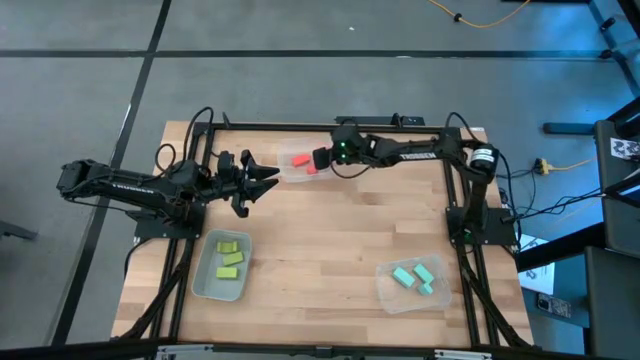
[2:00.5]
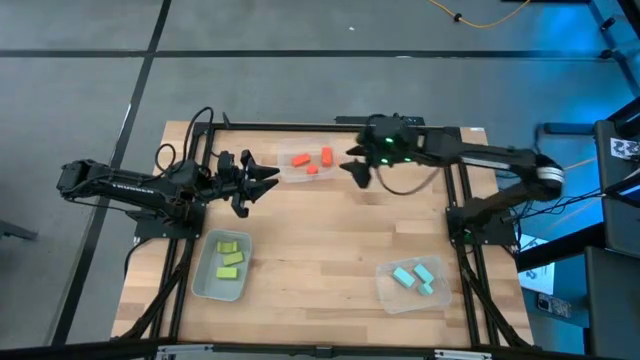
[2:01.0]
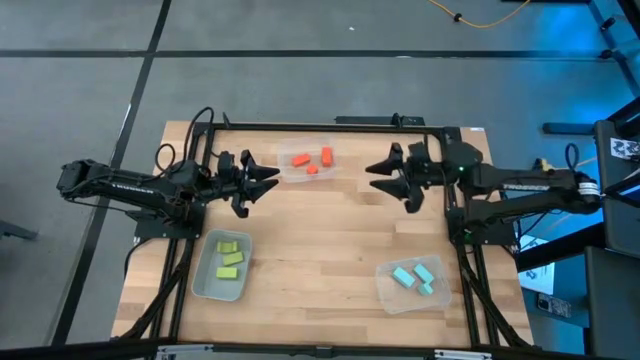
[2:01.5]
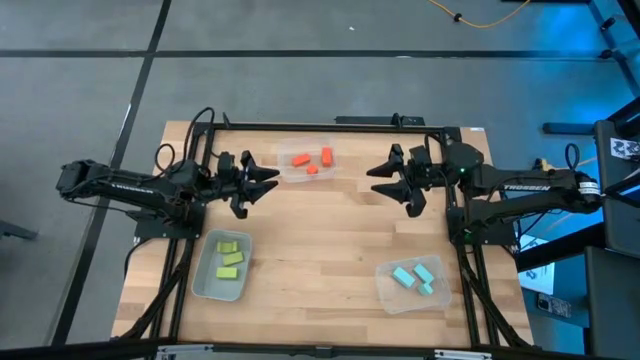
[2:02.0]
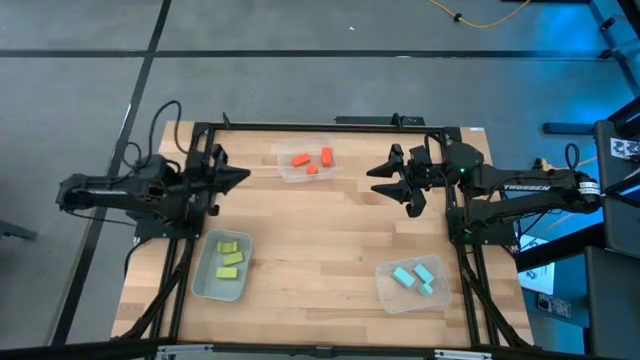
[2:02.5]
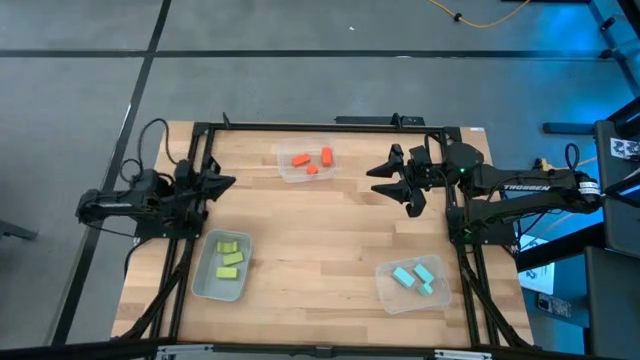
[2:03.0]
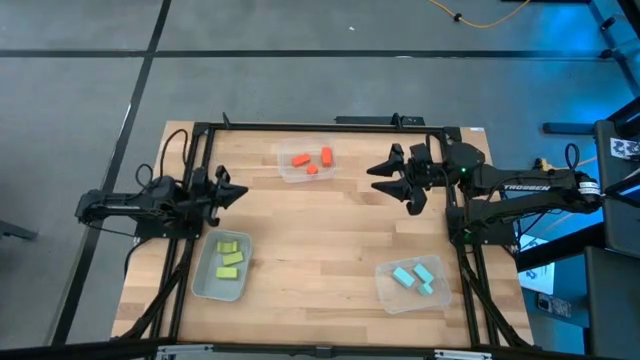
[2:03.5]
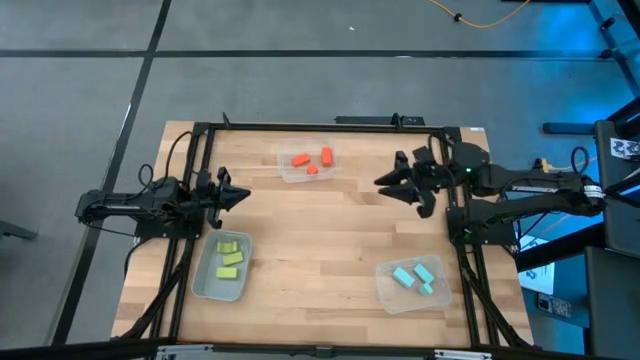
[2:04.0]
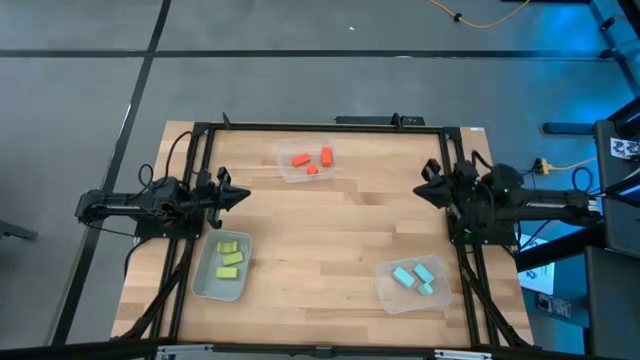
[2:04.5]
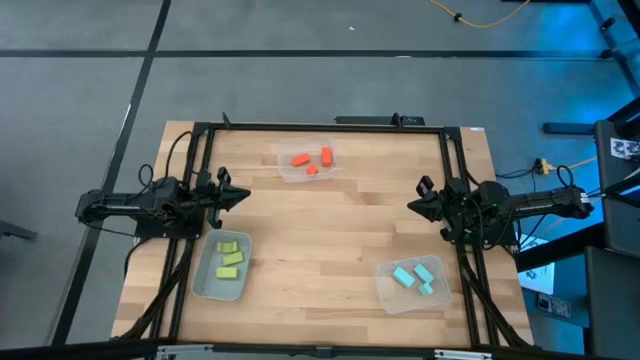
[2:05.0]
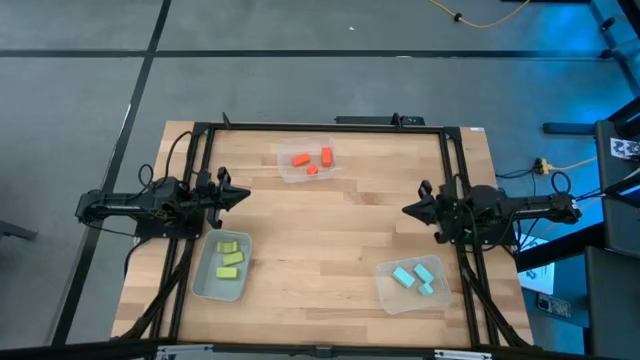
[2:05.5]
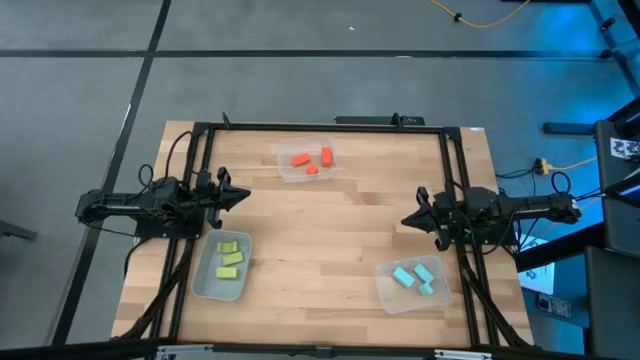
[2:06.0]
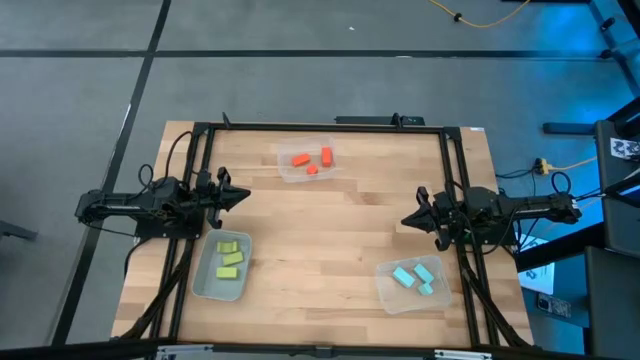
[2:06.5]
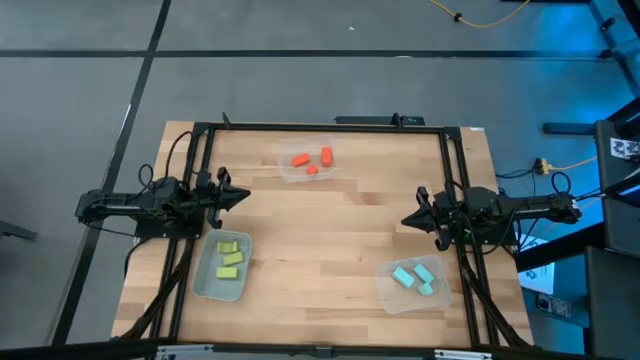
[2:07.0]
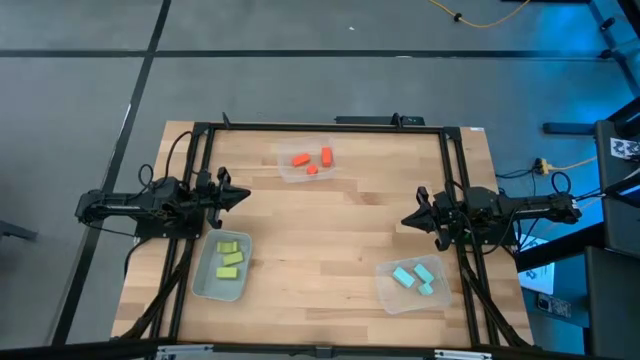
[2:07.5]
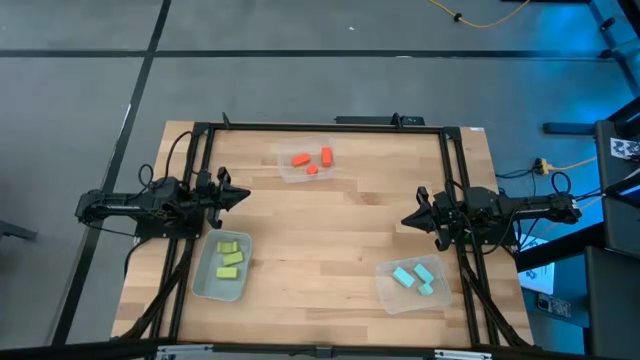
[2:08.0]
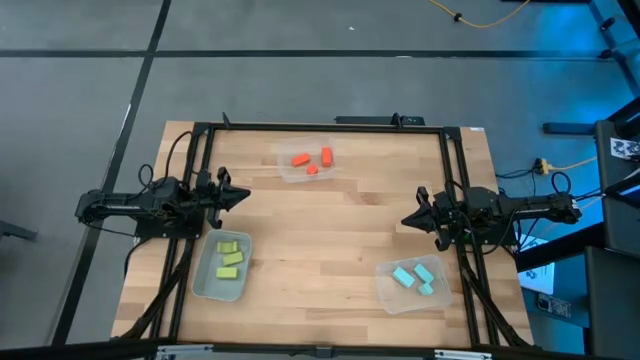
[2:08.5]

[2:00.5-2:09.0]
Task: Sort & place blocks by color
Return to Home Position

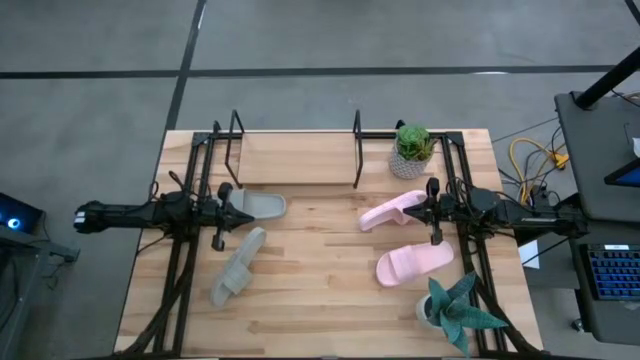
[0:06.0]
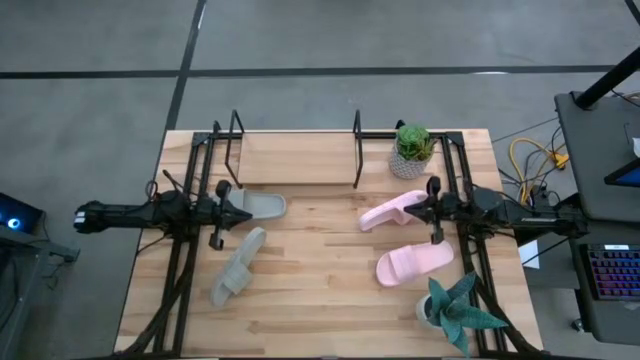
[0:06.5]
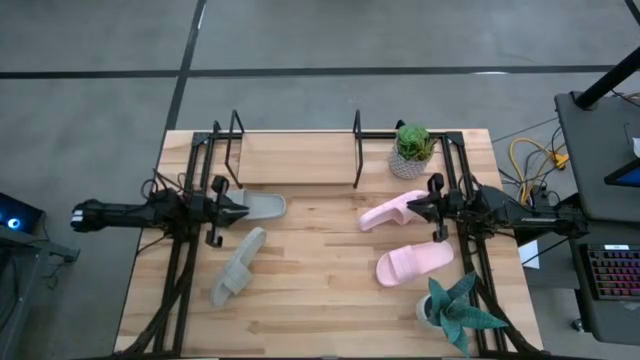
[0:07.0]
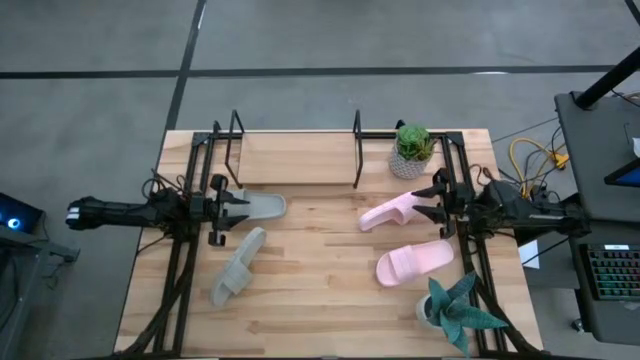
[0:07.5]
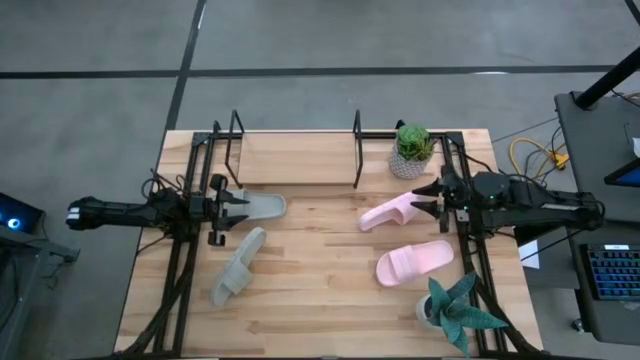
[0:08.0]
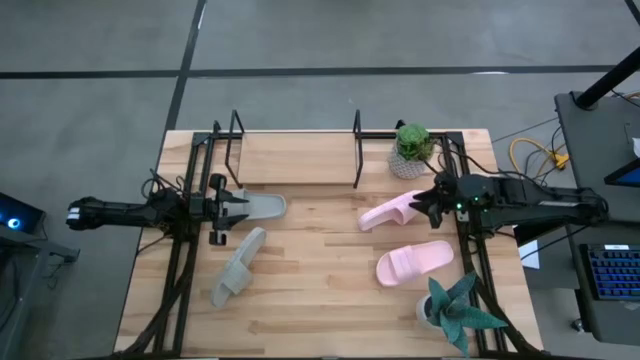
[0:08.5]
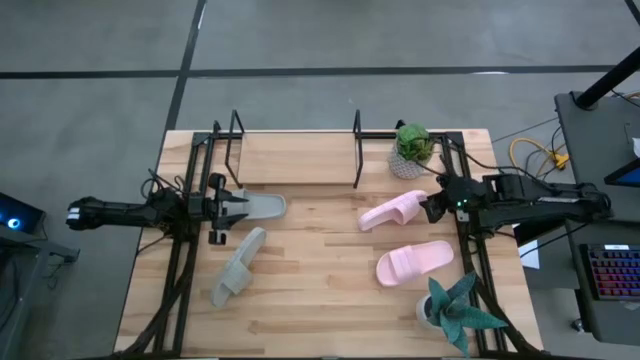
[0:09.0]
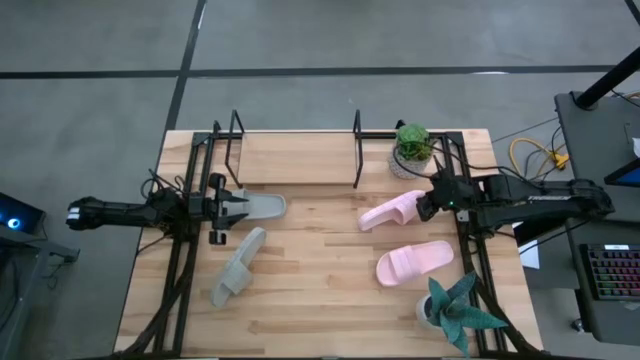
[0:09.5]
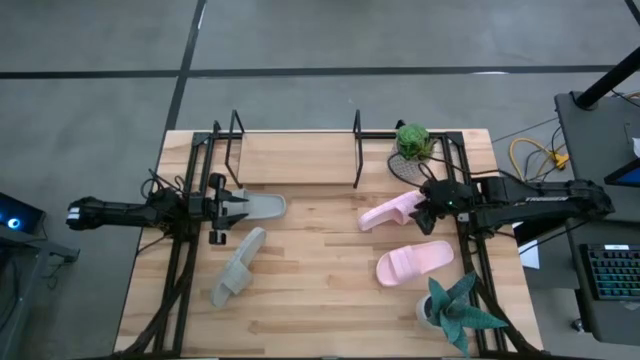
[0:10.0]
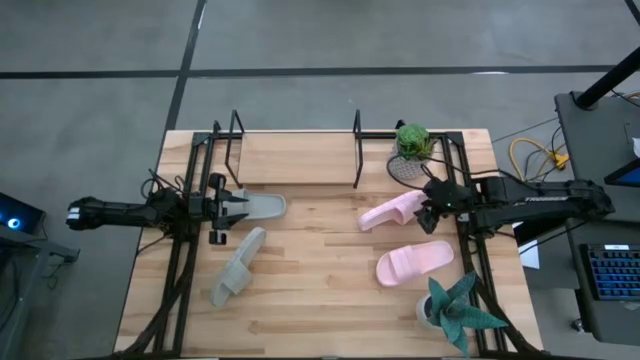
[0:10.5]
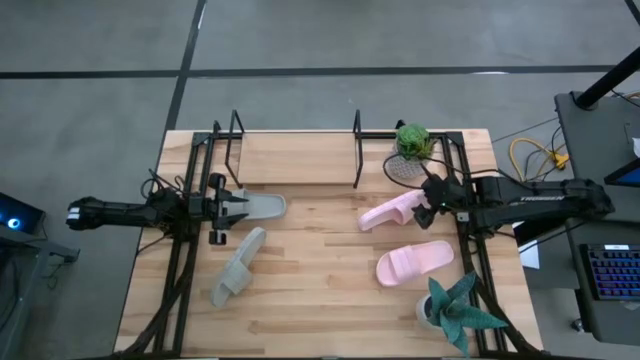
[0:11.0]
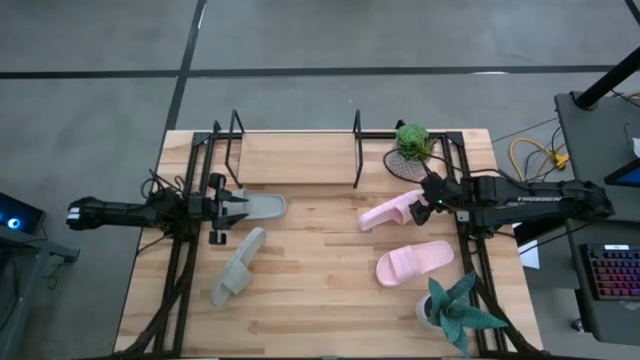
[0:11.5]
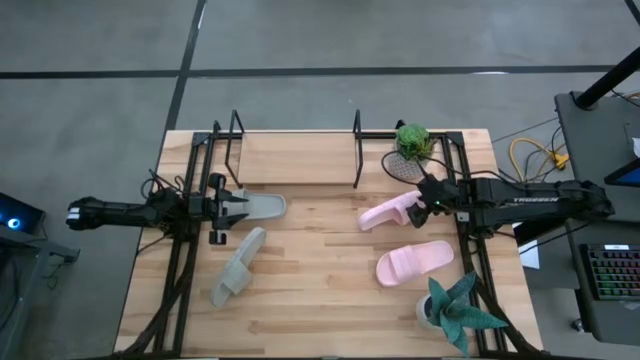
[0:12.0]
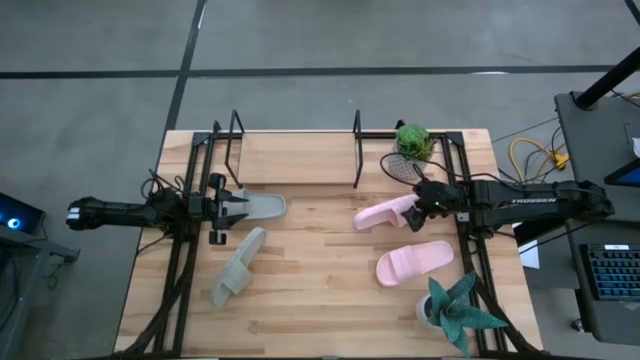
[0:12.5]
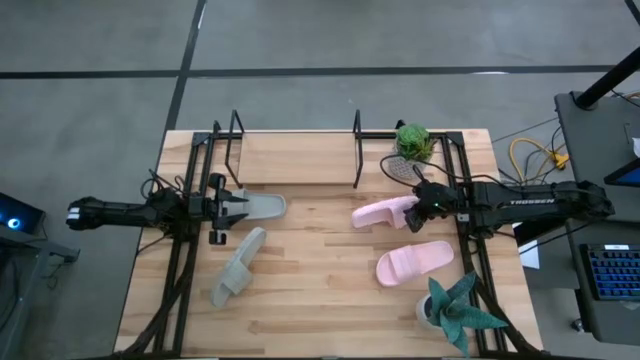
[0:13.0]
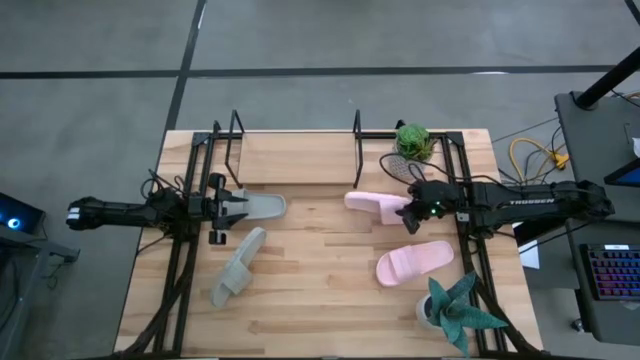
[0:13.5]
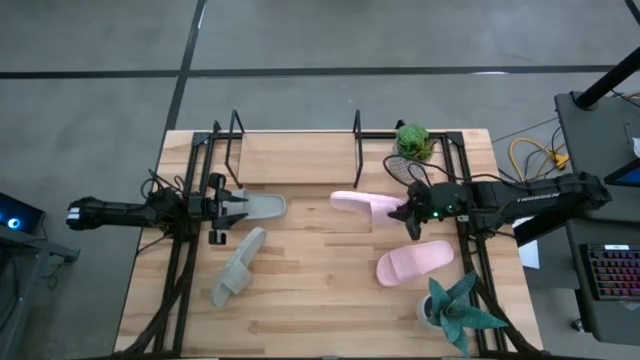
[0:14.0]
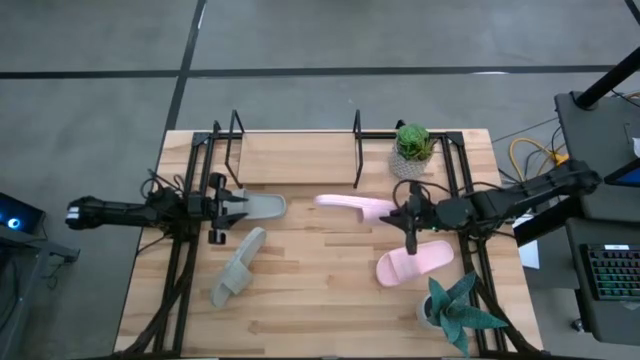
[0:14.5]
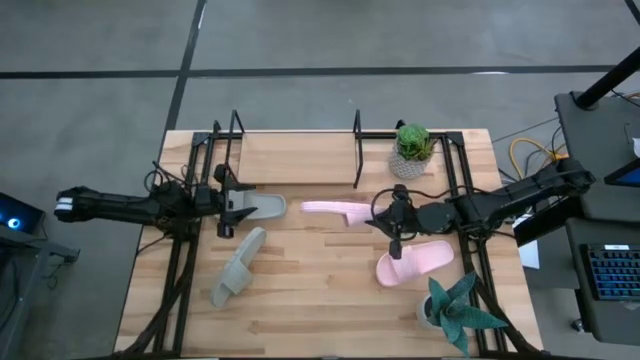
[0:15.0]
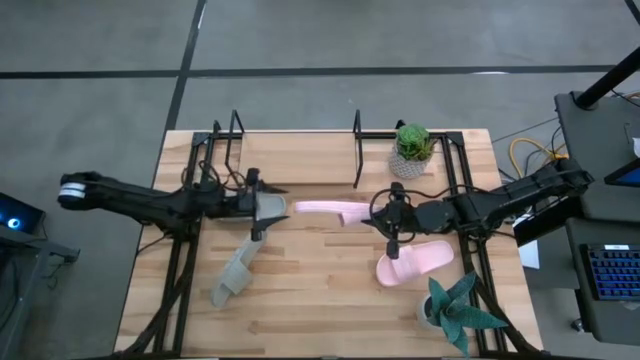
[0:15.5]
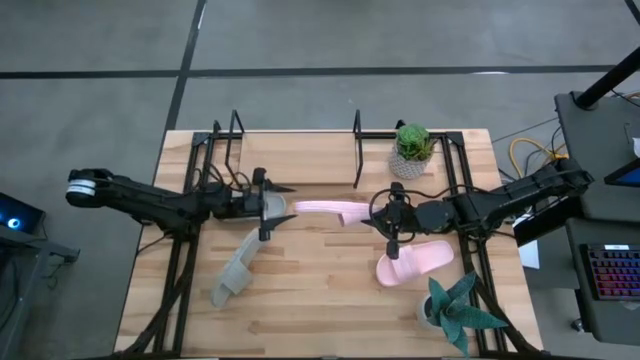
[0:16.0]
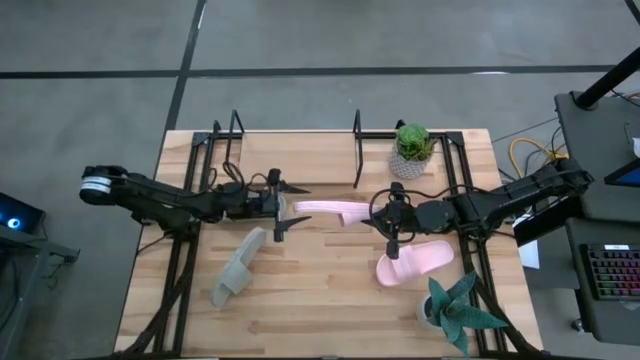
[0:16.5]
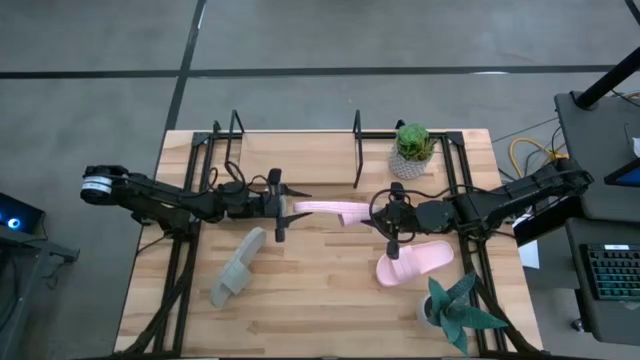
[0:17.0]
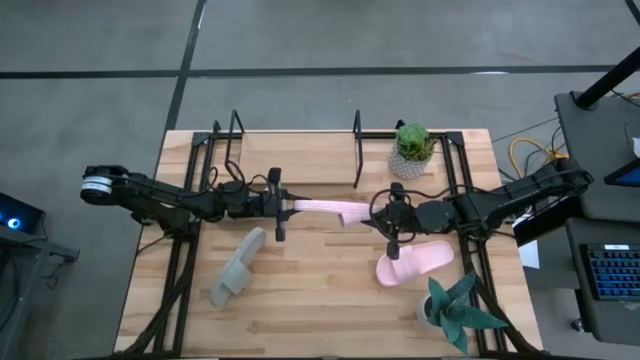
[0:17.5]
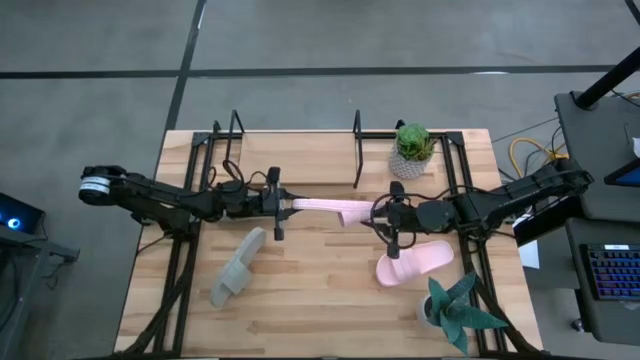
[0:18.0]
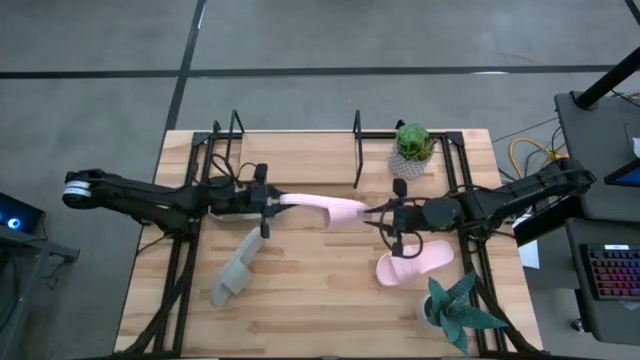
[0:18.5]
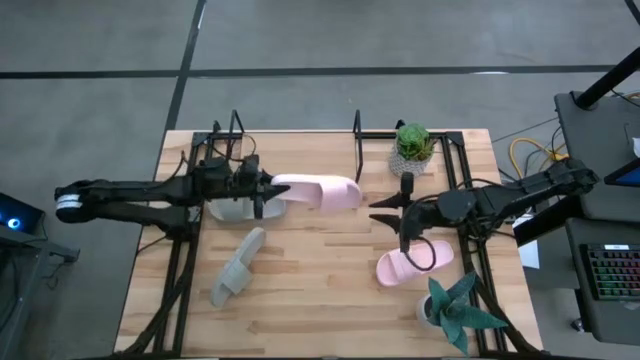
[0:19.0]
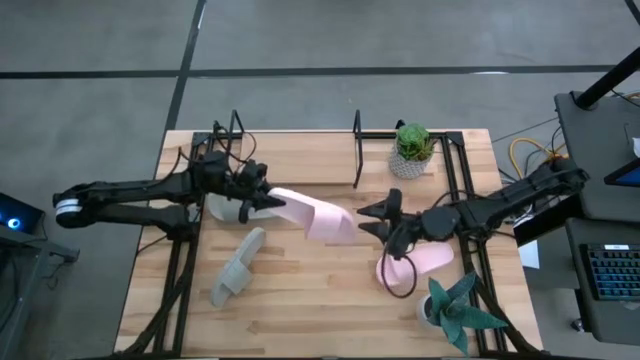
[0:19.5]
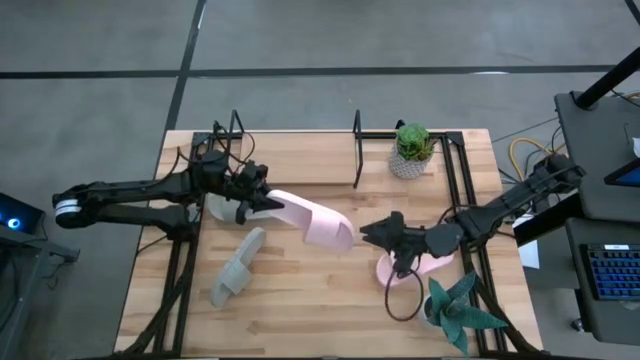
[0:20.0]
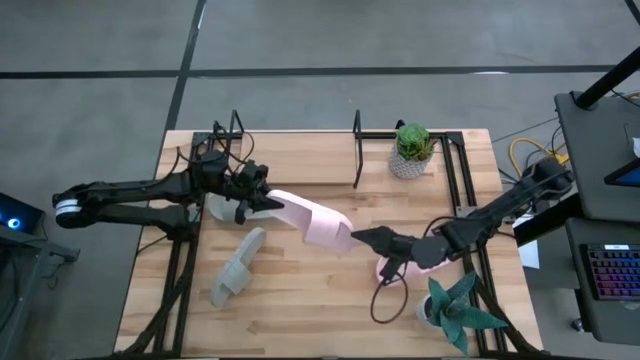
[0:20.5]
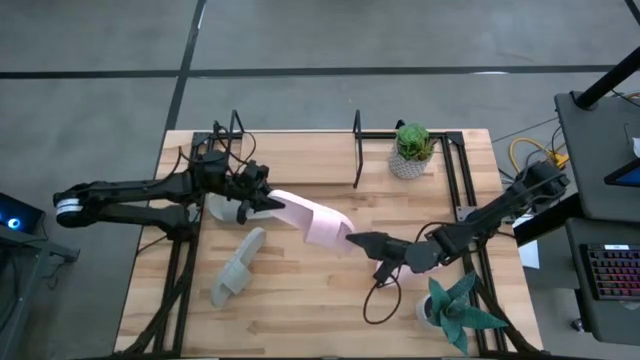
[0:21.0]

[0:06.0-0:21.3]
Task: Pick and place slides into the shelf
Put the top pink slide on the shelf
